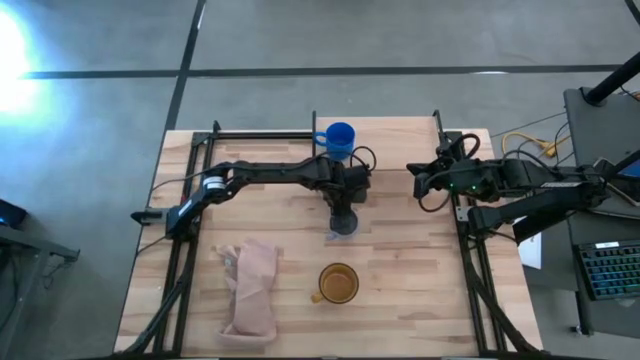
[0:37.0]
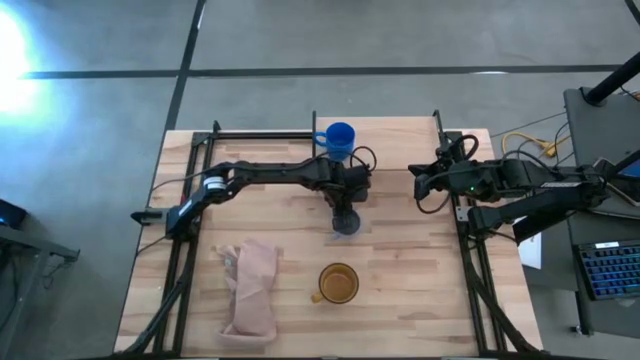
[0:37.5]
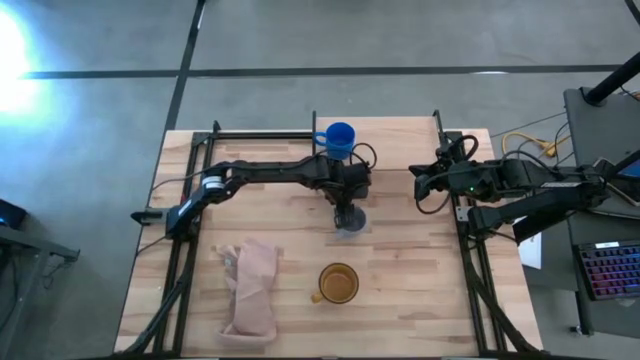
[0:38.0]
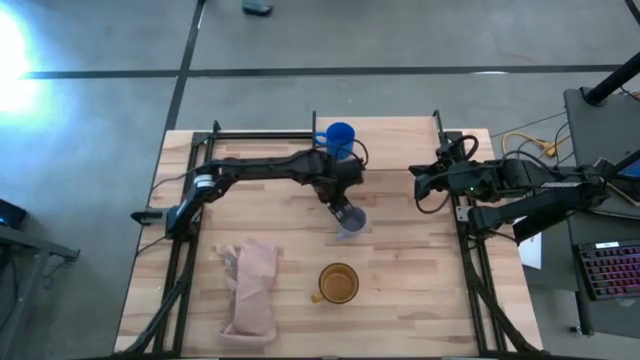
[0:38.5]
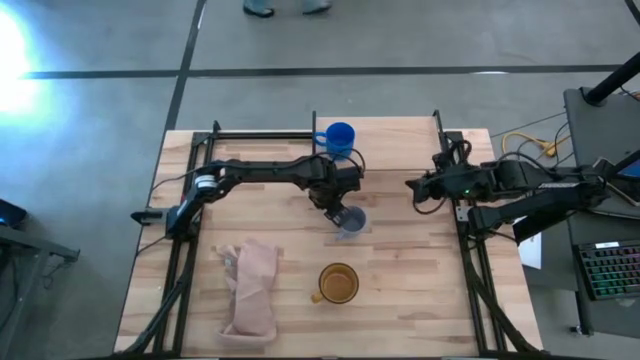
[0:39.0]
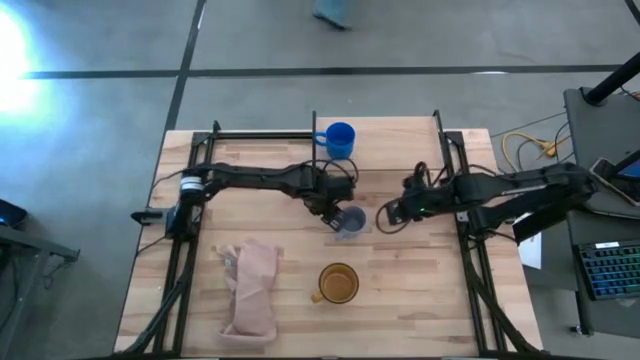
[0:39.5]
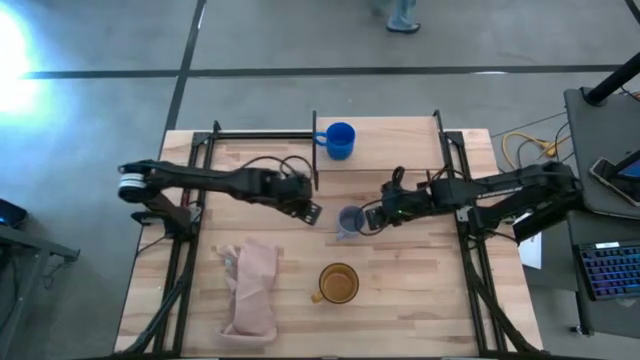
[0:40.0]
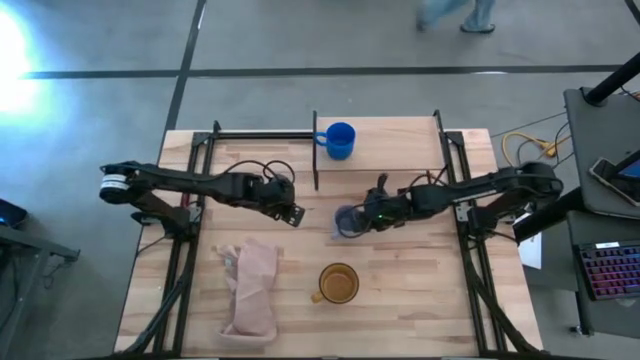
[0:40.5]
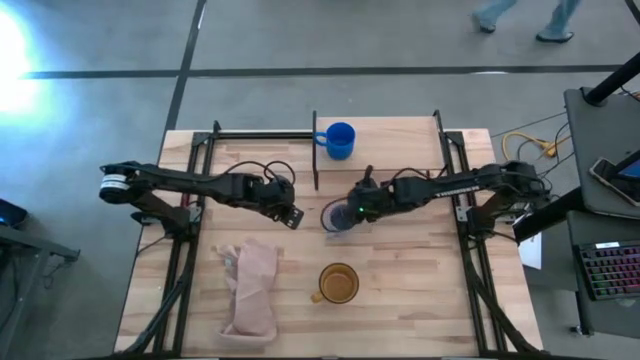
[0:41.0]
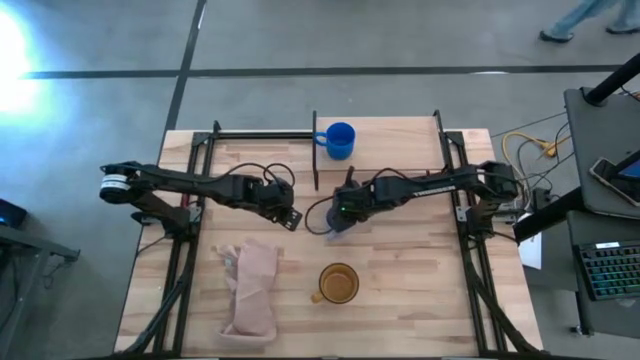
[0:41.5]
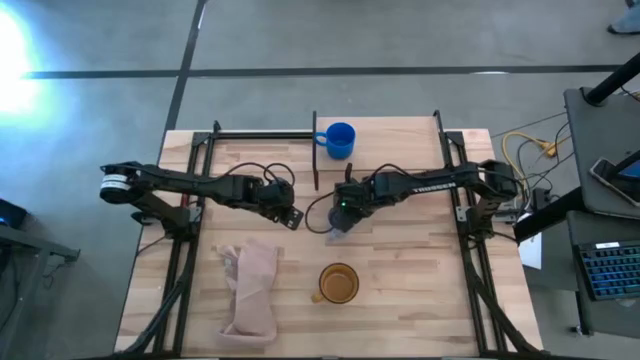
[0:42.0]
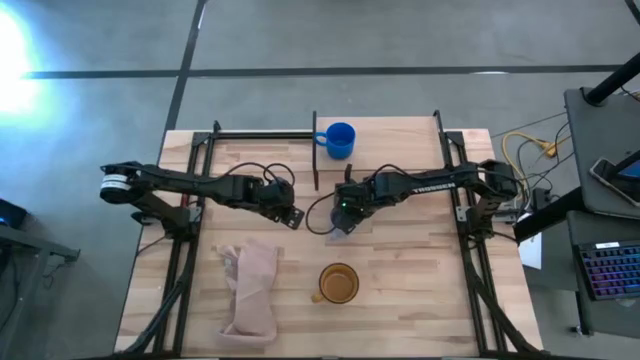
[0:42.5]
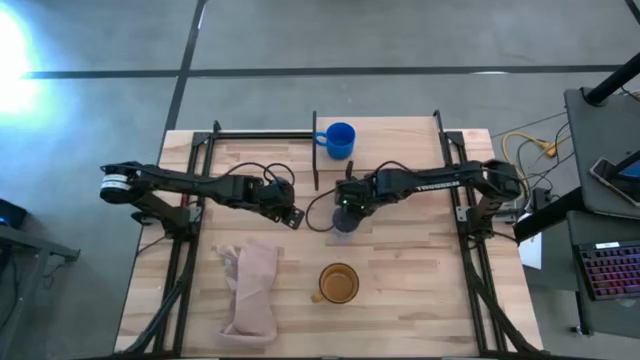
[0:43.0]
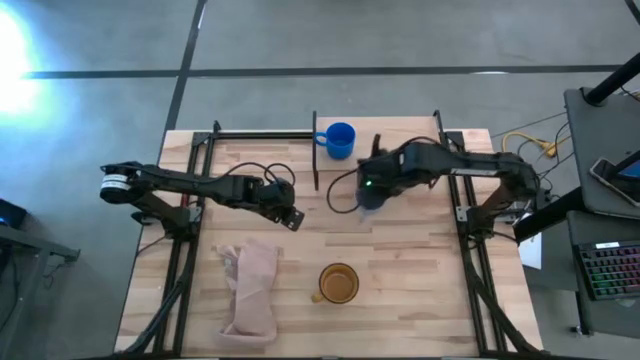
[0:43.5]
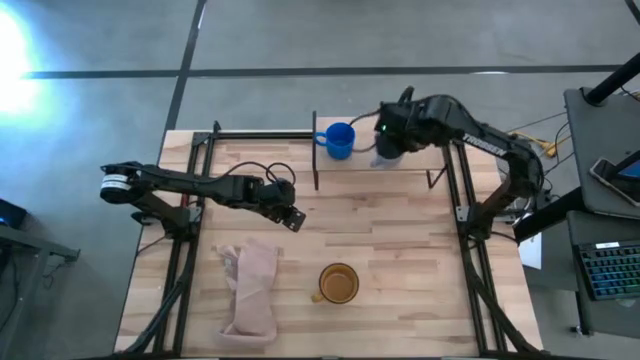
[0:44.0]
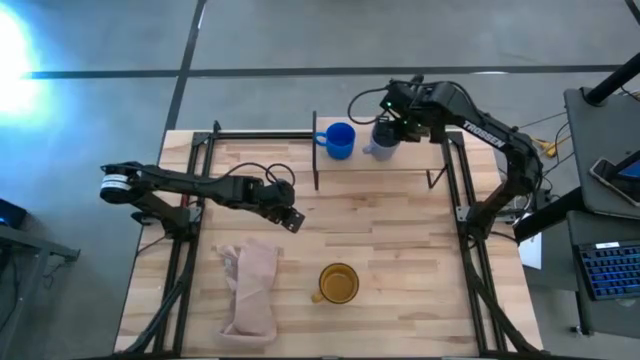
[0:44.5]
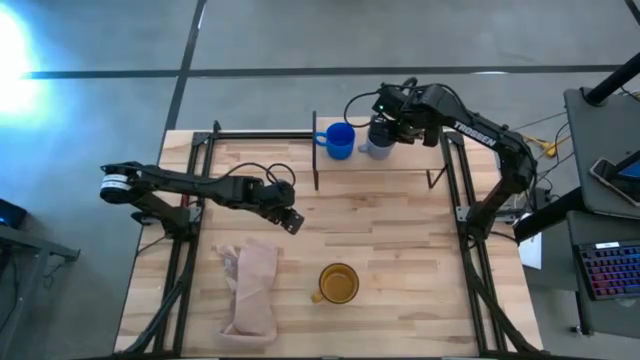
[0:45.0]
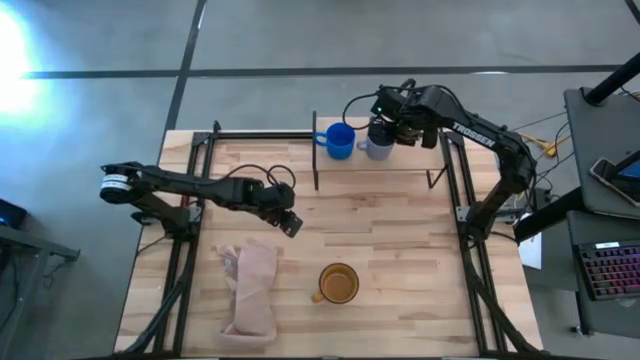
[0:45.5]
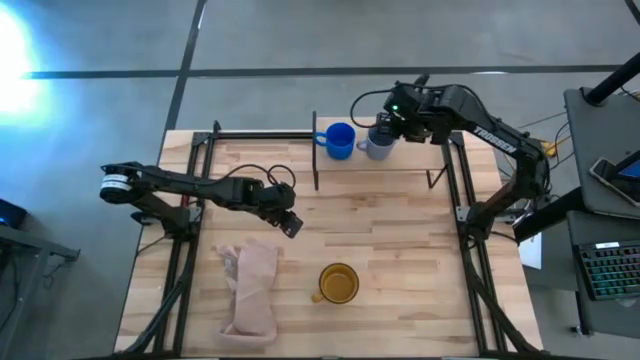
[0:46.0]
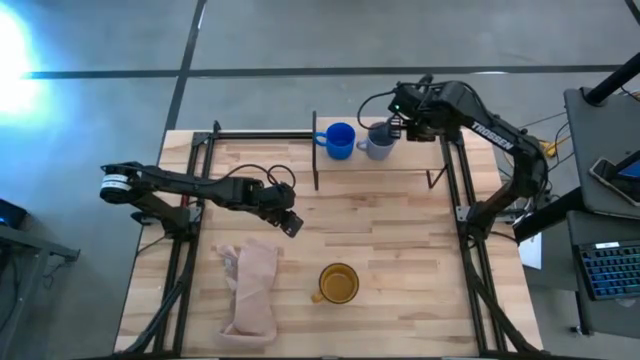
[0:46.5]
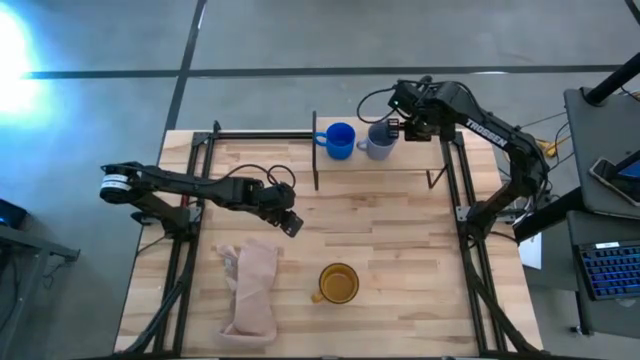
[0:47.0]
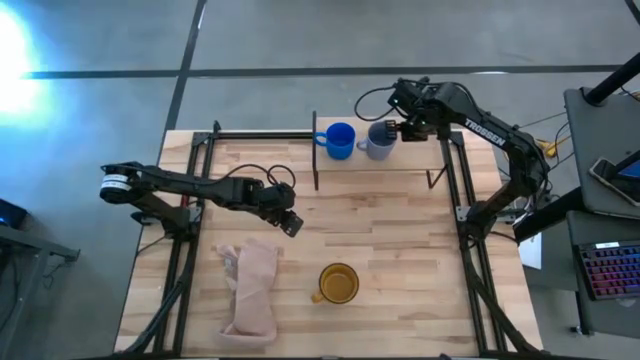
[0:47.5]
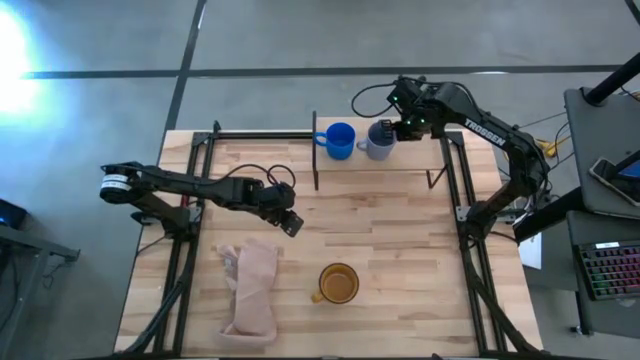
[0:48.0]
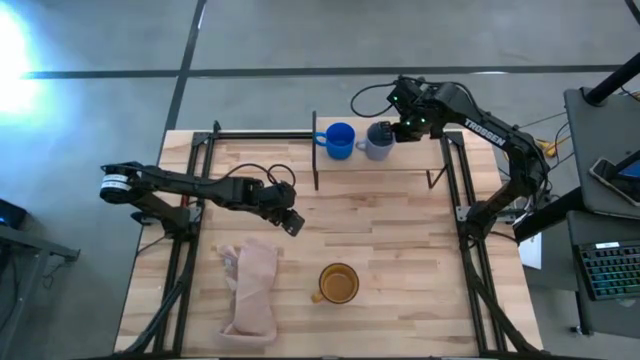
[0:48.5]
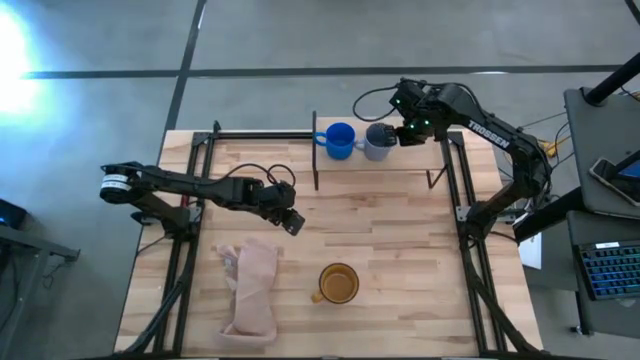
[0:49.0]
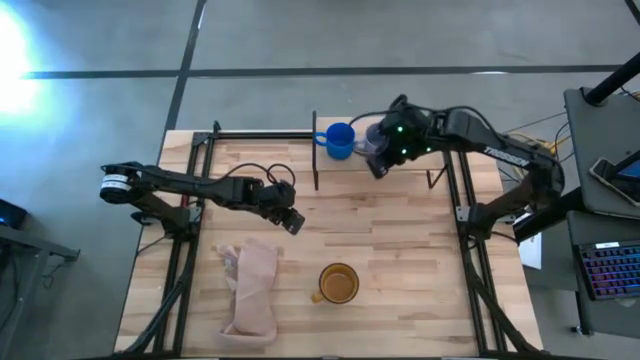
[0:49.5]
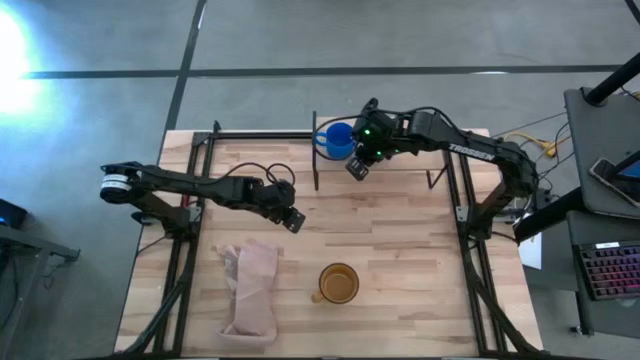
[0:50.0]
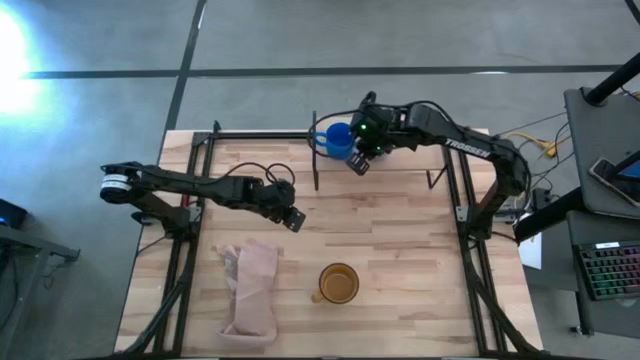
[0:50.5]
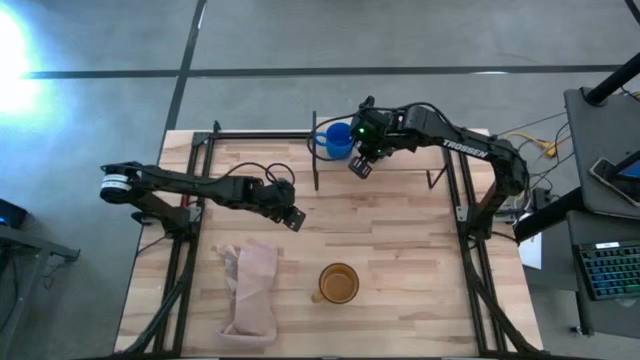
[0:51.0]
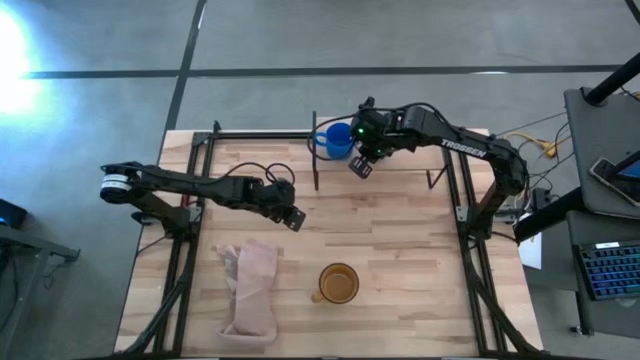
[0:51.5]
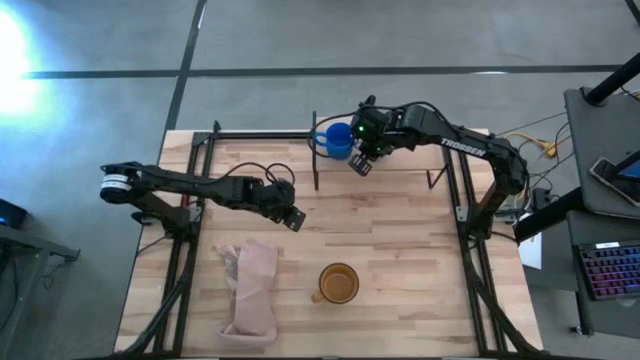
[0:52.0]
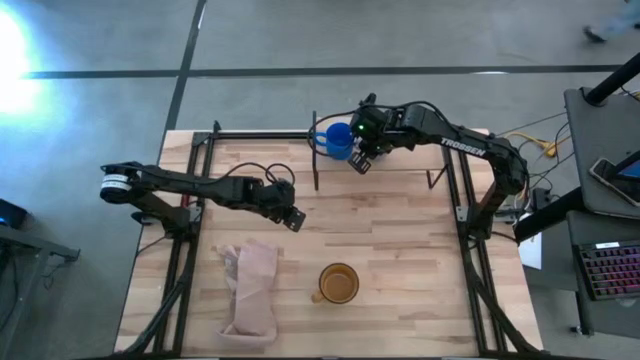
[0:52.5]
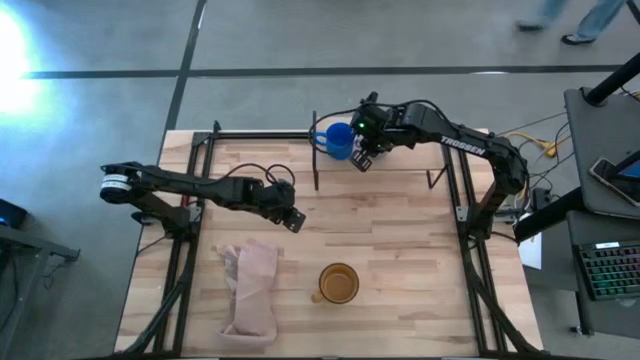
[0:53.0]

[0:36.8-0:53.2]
Task: Stack small to large cups/mugs on shelf
Put the light blue mug on the shelf

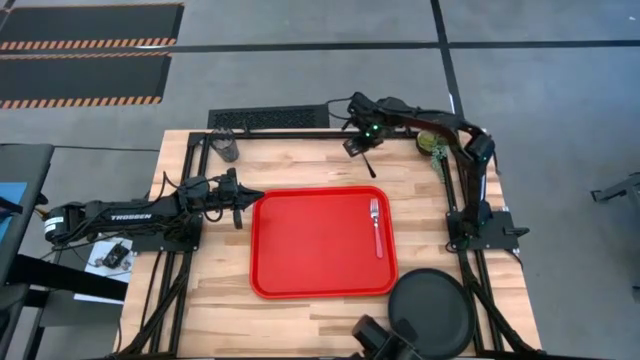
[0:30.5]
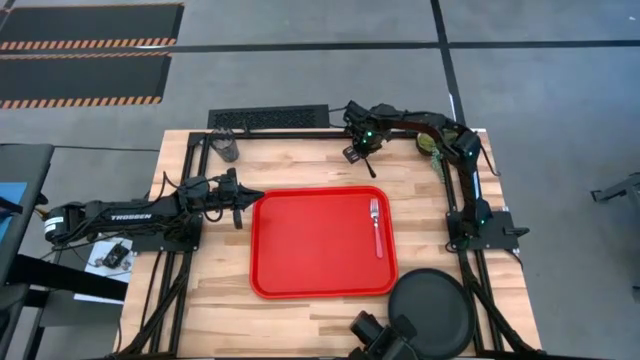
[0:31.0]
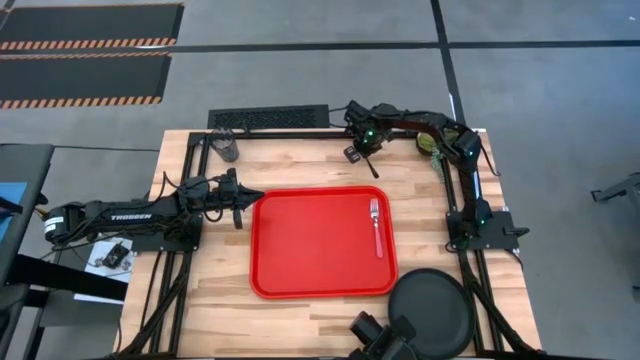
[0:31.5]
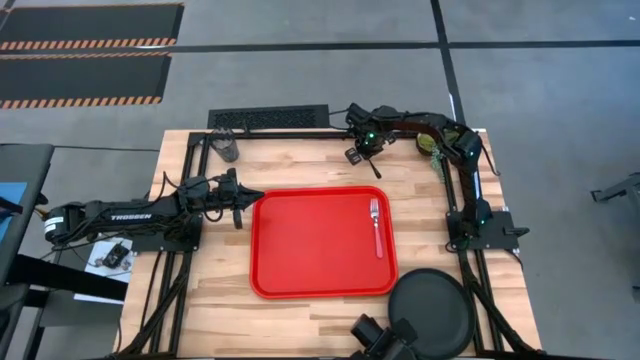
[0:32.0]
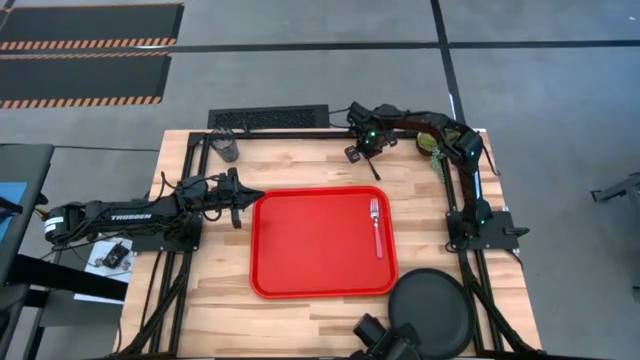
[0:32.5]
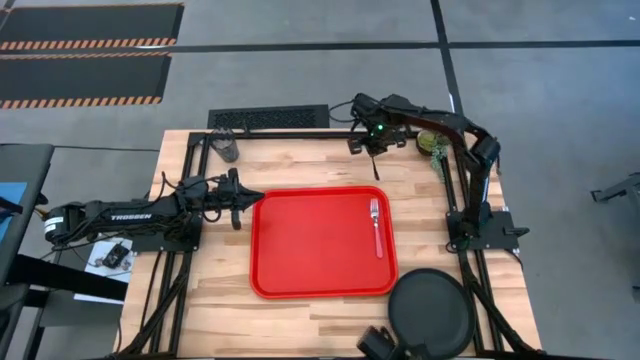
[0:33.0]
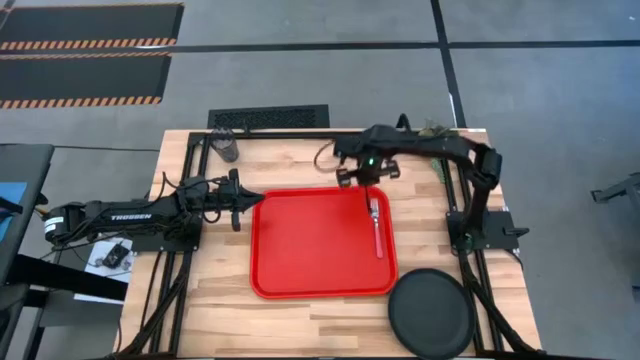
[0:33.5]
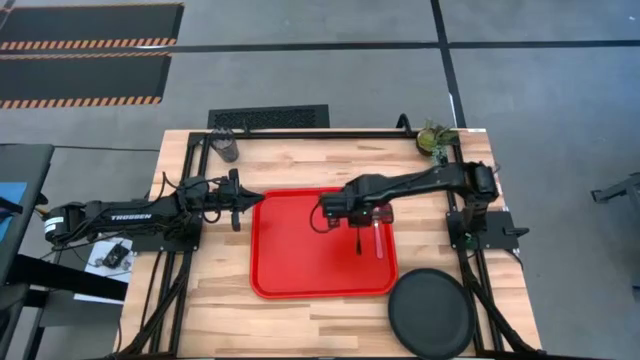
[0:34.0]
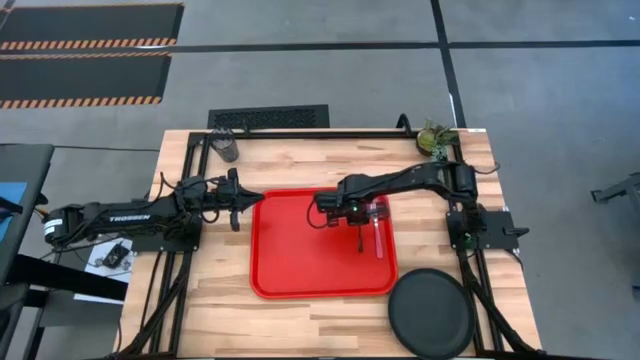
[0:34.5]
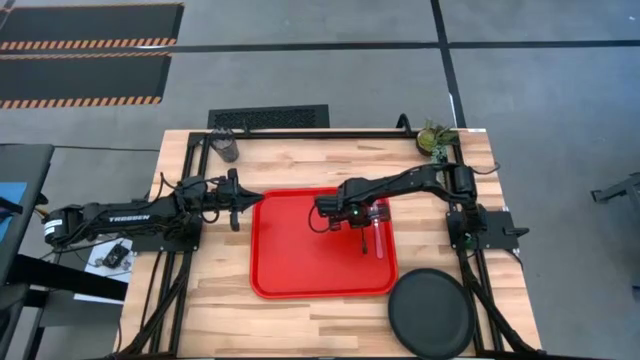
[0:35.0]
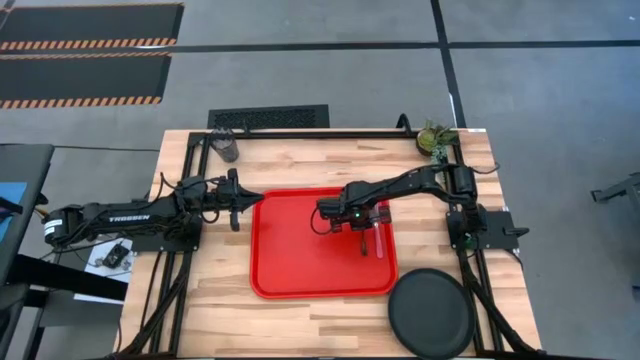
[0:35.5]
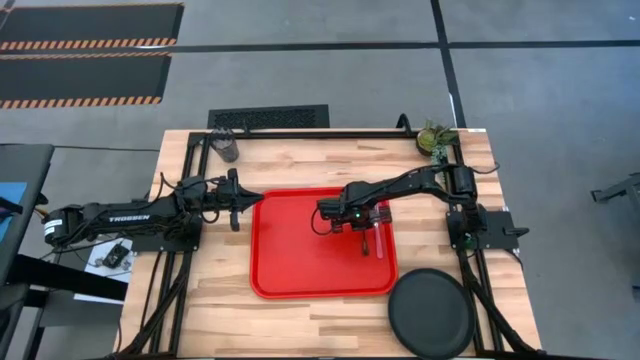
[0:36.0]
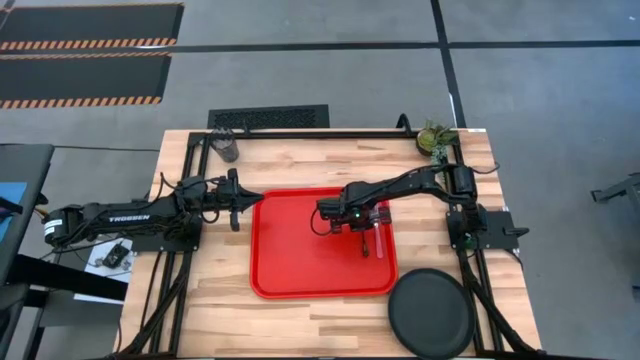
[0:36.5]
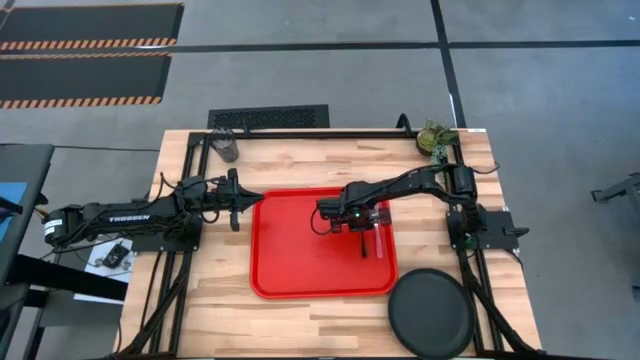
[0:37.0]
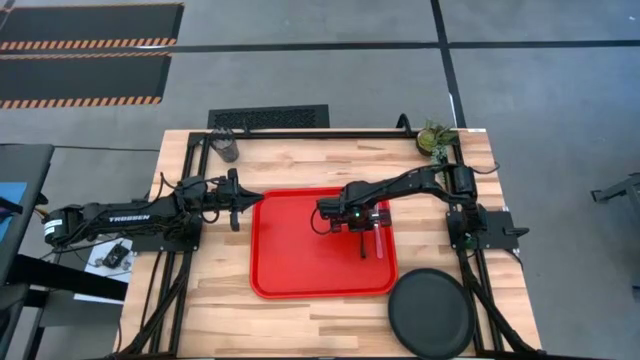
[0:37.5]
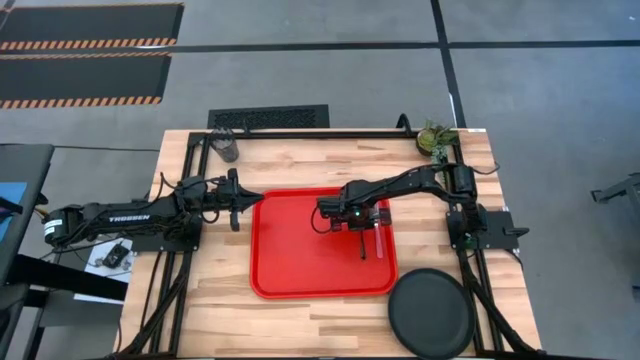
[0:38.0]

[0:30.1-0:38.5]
Task: Pick and place plate/cup/fork/spoon on tray
Put the black spoon to the left of the red fork on the red tray
